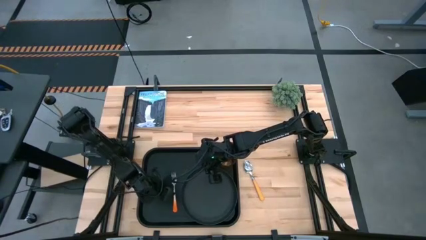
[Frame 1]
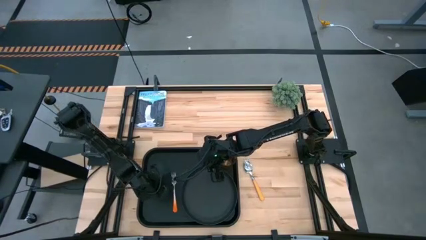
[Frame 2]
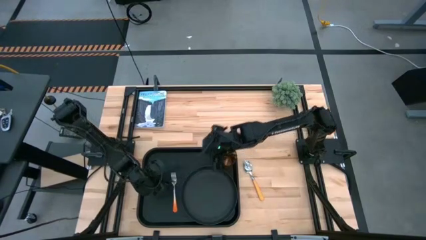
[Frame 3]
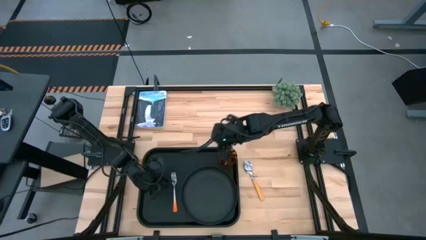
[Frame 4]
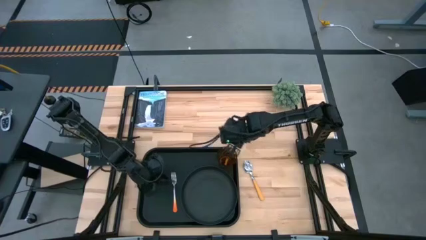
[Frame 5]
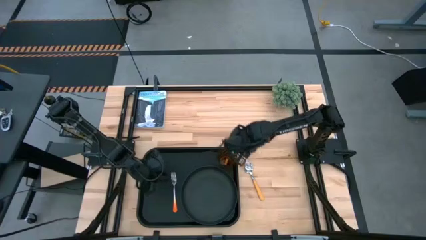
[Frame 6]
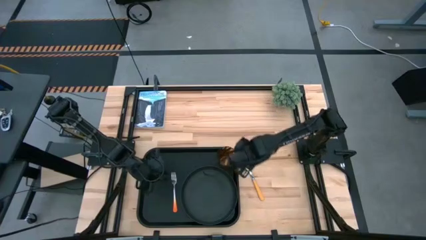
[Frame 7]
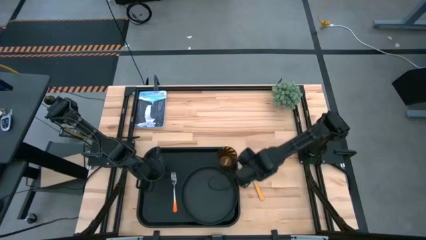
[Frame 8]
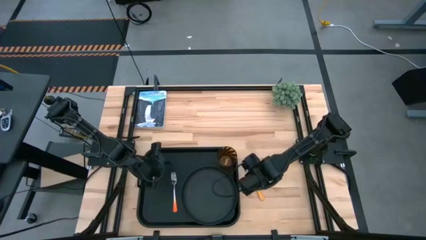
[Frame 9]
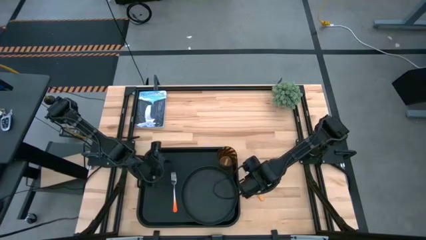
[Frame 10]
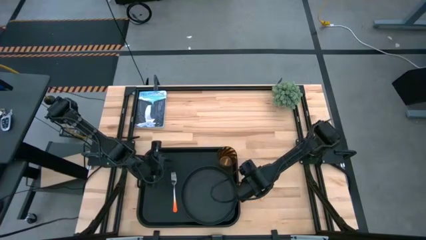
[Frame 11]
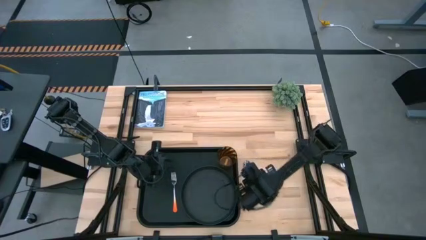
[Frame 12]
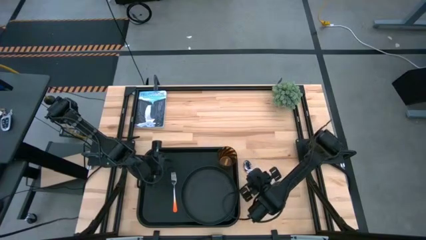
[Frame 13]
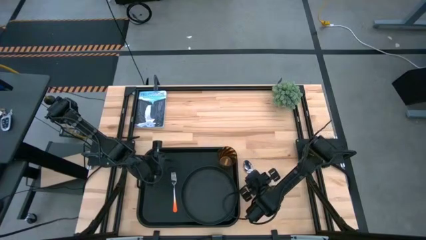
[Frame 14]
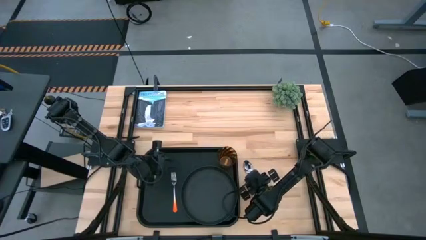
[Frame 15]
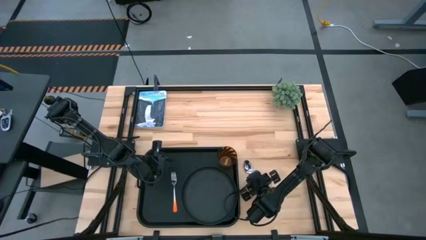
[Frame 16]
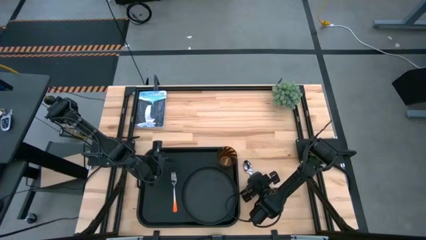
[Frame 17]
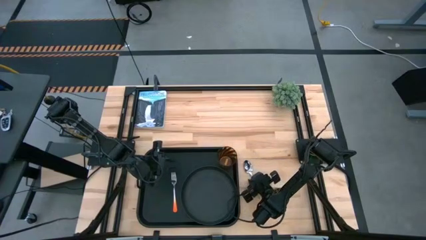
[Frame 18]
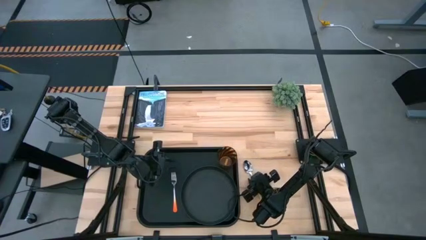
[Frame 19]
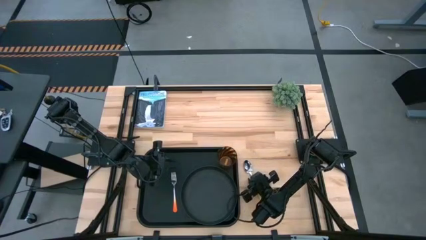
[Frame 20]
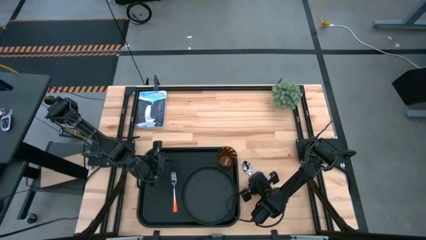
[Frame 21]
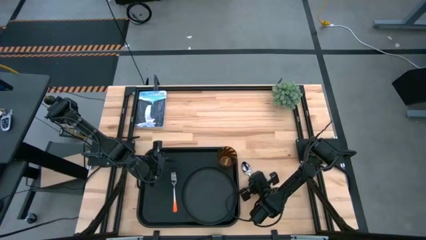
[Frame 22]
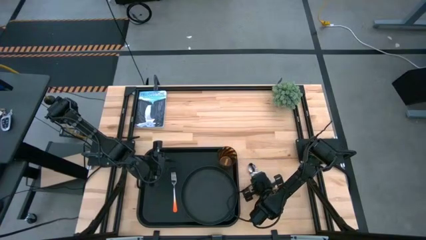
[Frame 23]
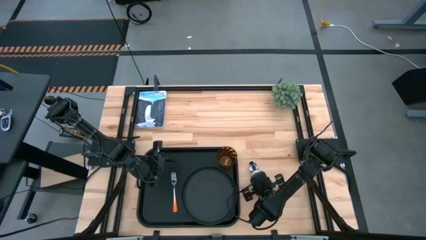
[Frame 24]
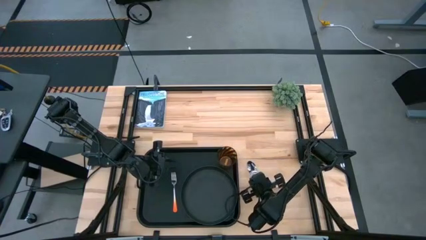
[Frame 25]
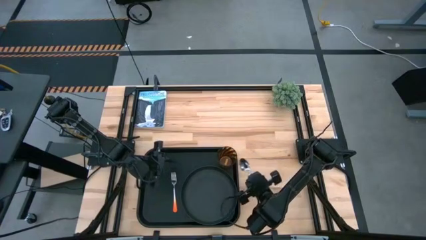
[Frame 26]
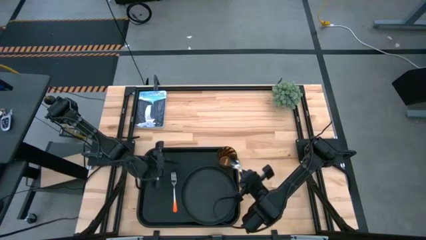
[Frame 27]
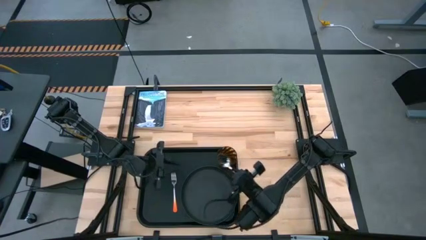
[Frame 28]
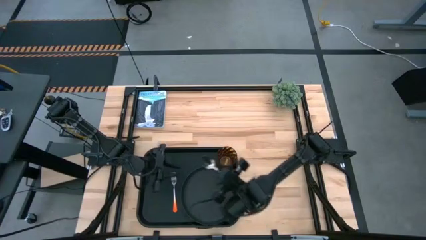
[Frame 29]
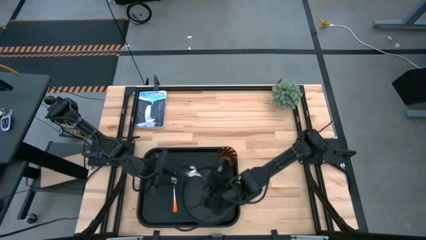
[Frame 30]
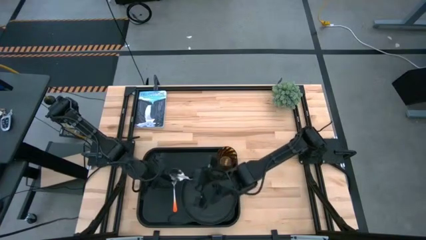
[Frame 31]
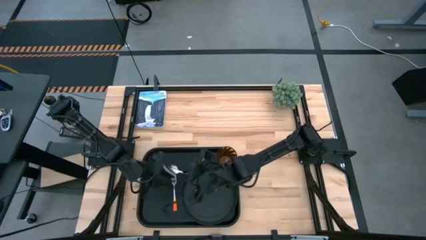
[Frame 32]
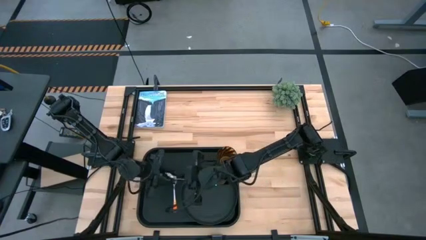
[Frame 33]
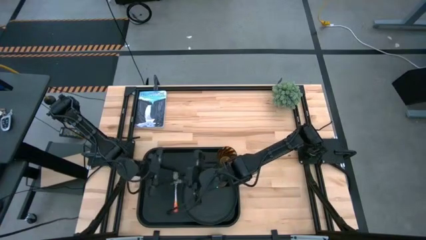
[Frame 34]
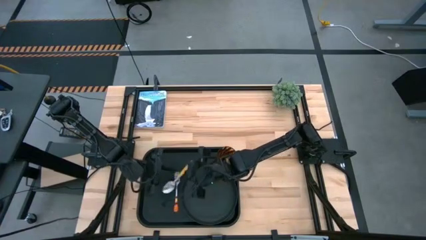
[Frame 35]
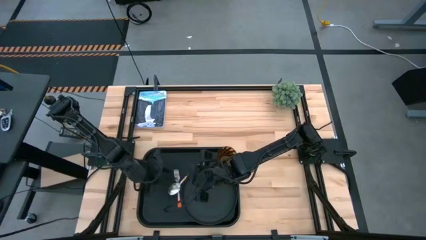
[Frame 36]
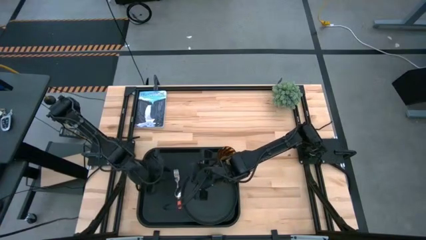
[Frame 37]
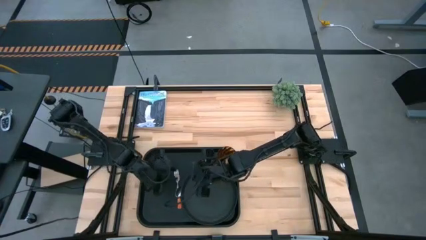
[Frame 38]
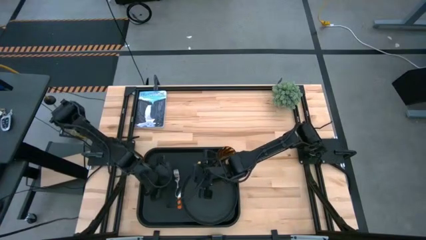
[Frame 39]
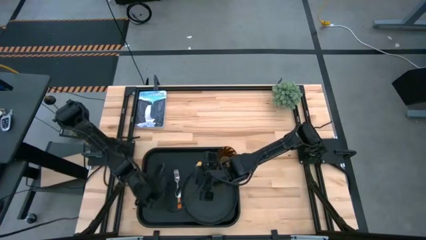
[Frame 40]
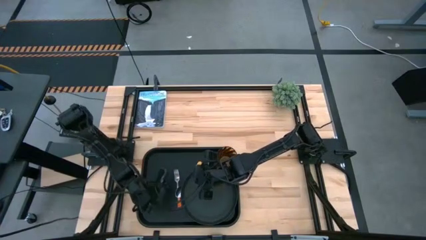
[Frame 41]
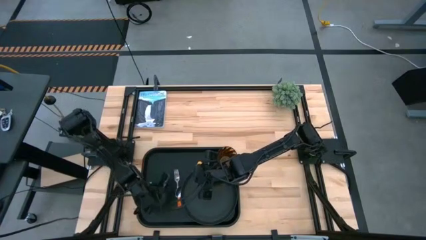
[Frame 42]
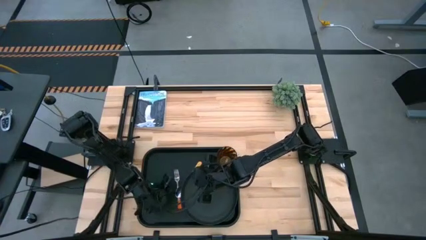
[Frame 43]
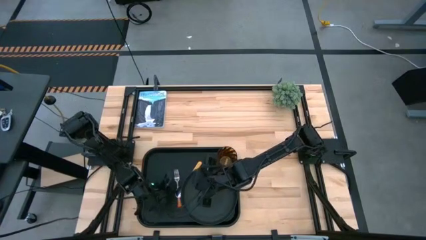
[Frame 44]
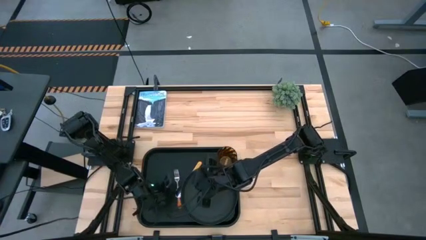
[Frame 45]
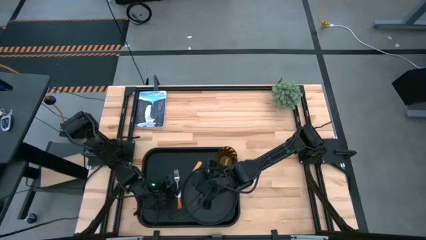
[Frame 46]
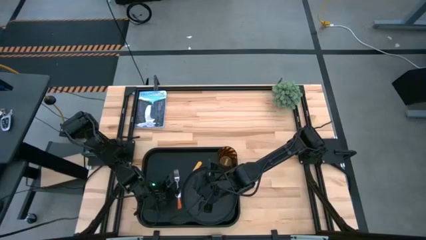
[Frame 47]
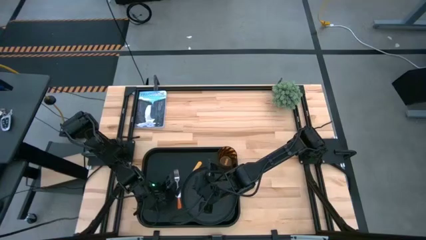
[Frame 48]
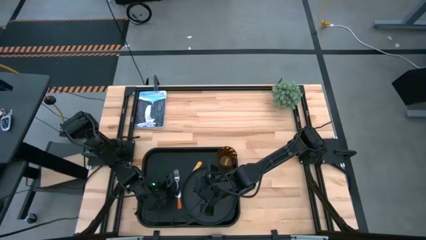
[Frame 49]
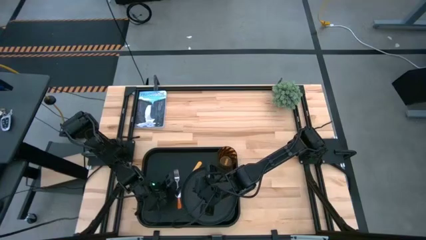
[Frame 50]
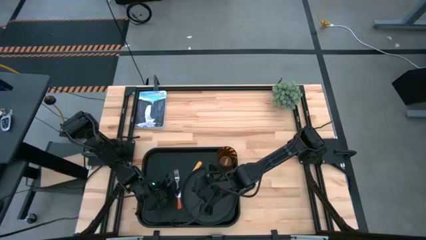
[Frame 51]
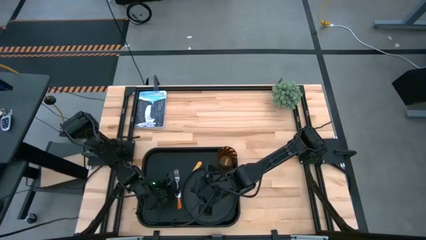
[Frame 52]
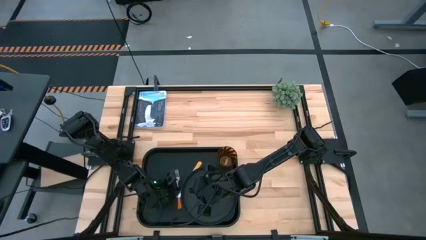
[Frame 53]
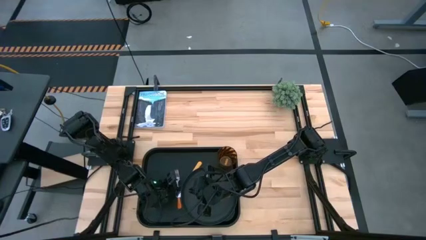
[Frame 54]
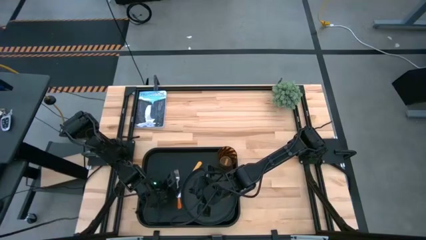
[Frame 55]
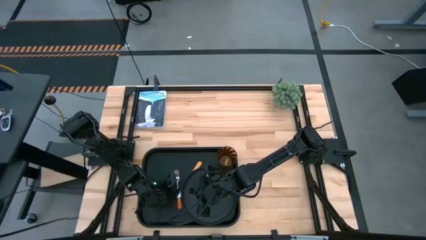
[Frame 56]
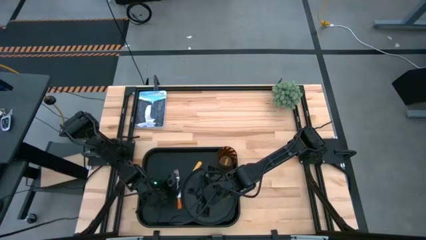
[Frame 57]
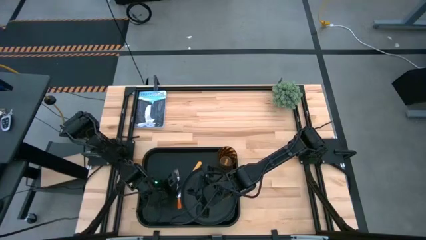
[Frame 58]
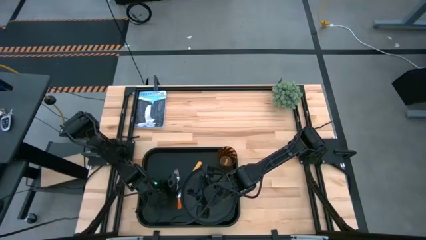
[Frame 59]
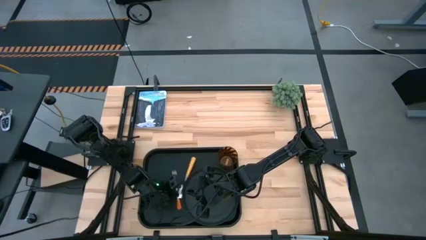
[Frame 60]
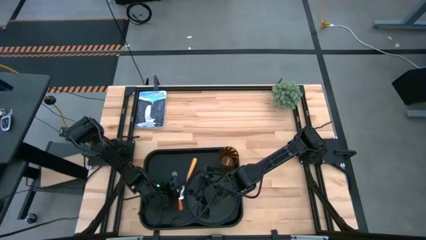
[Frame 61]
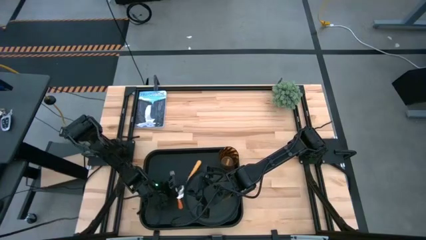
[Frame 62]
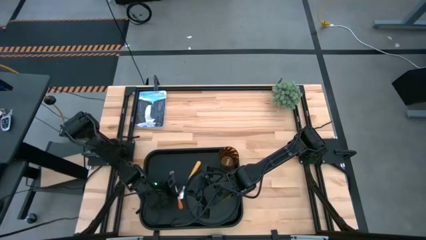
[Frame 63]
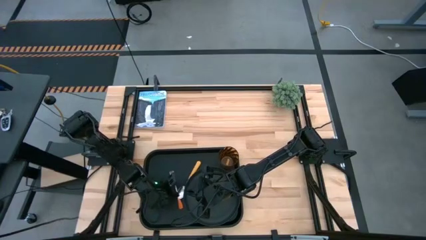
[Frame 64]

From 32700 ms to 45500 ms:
Task: Pick and place plate/cup/fork/spoon on tray
Put the yellow spoon to the left of the orange fork on the black tray

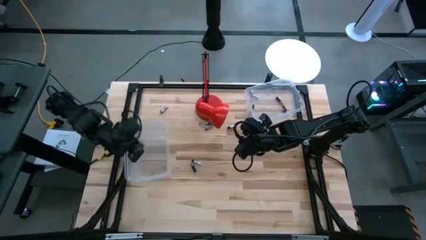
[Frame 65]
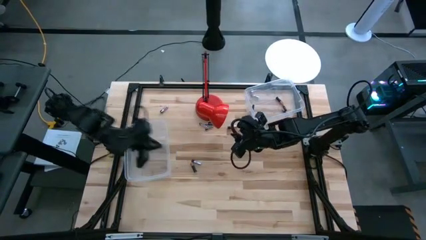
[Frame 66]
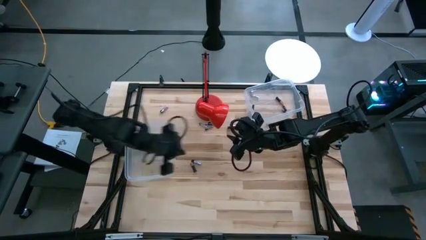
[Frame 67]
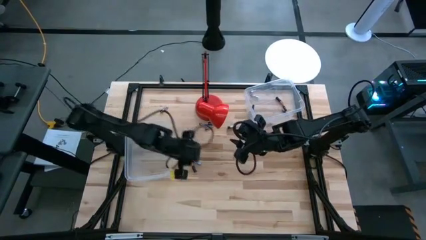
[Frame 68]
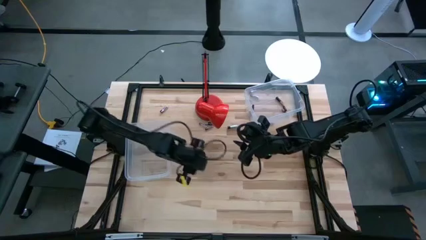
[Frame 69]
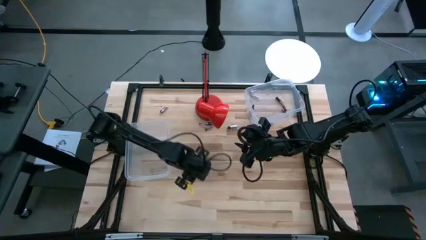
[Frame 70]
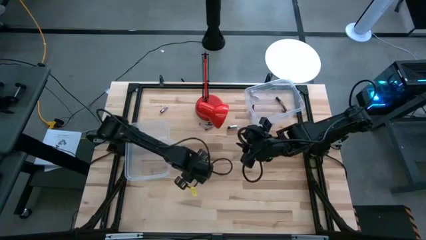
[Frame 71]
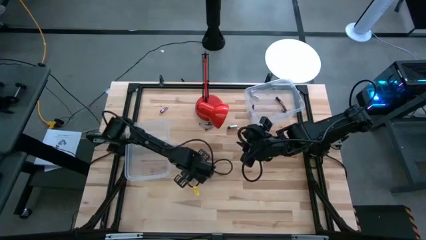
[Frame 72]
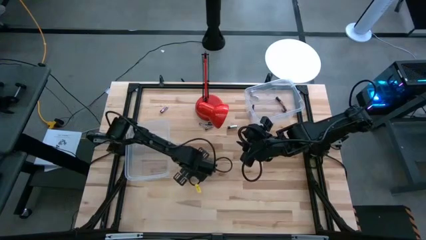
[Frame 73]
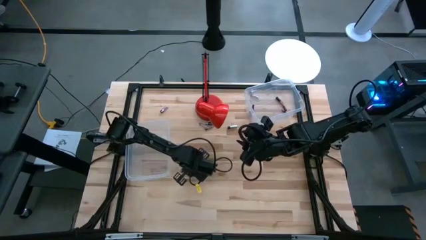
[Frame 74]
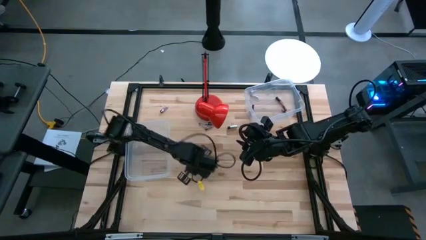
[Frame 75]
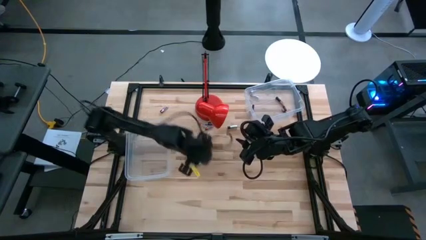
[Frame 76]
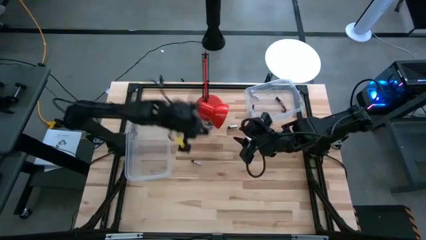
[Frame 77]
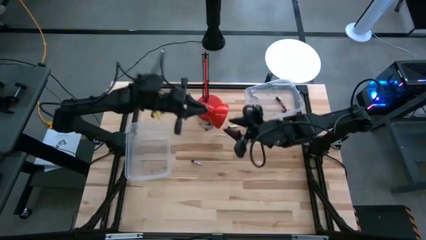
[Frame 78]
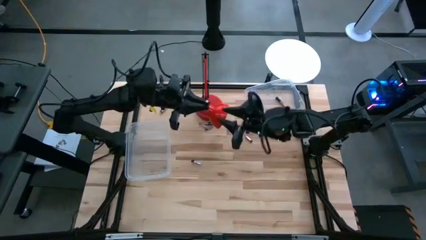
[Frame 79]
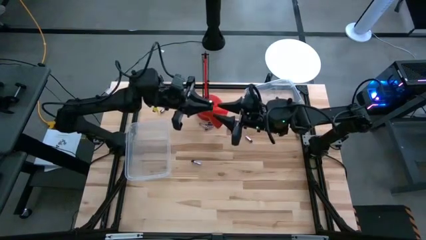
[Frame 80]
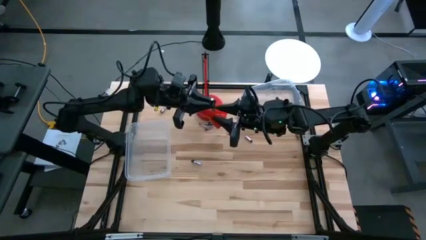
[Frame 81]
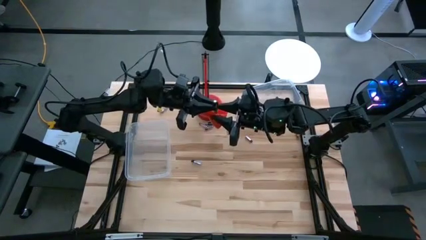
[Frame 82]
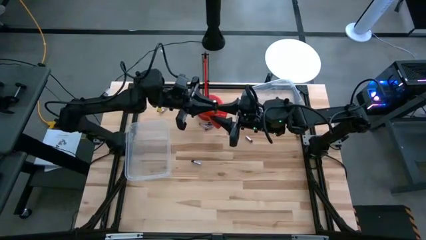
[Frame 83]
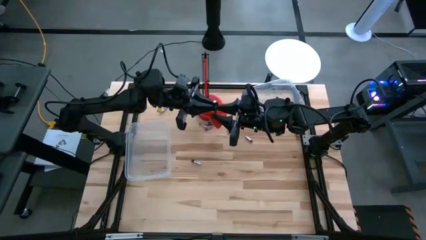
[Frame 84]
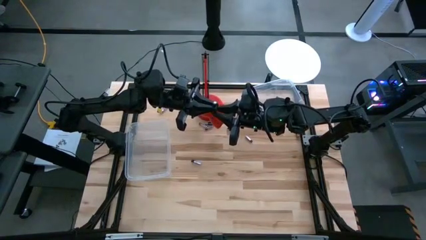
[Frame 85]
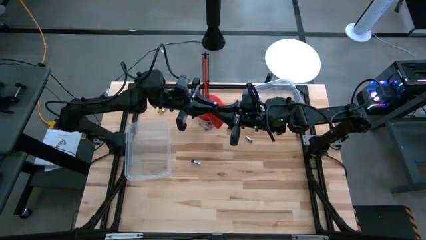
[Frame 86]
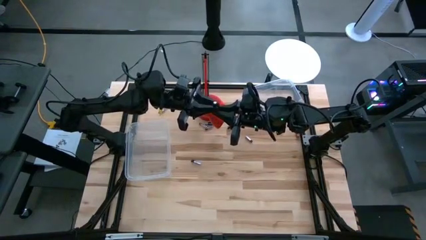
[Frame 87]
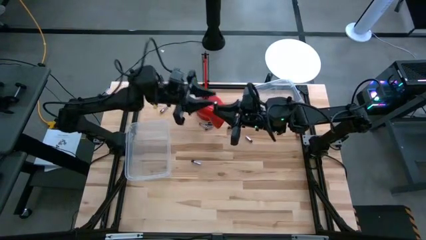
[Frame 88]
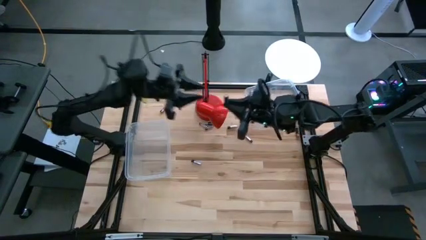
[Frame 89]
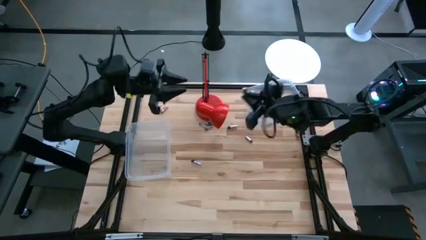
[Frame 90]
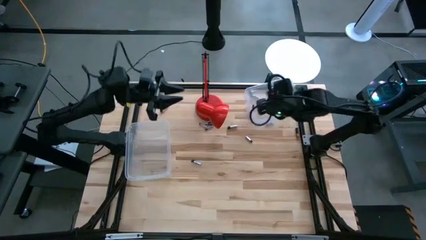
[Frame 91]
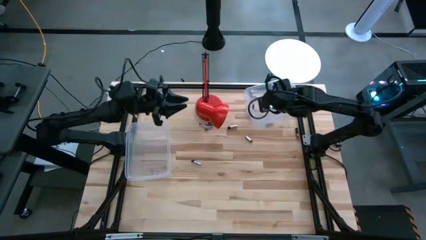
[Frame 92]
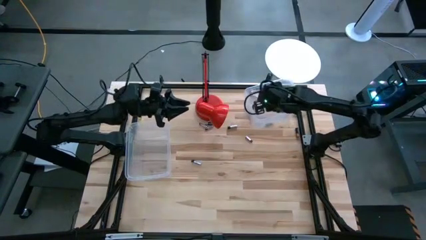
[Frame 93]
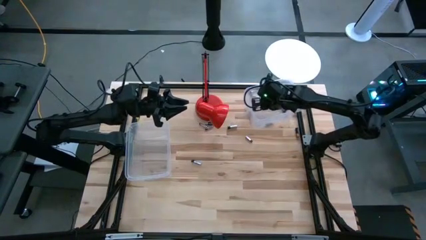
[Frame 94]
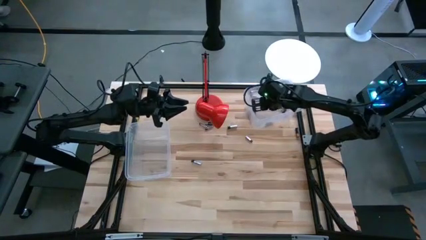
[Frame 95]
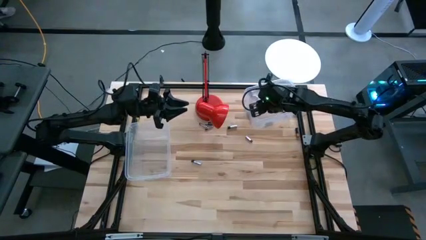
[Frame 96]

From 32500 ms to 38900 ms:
Task: Sort batteries
Put the black battery into the top transparent bin
